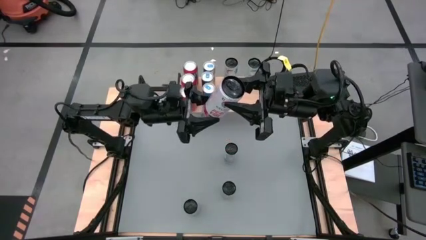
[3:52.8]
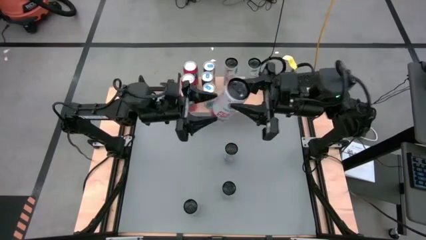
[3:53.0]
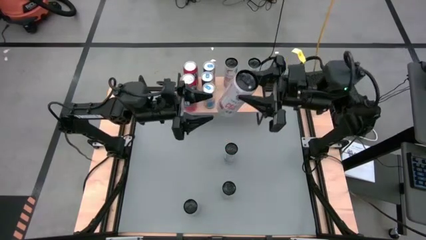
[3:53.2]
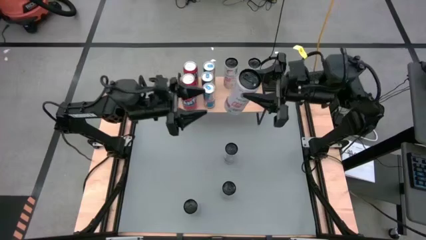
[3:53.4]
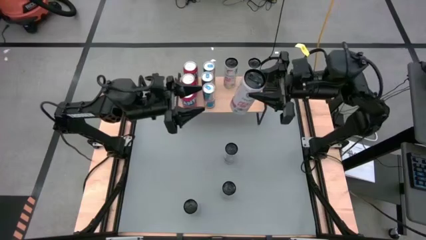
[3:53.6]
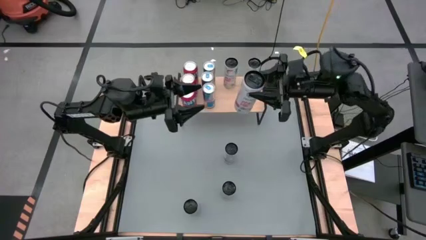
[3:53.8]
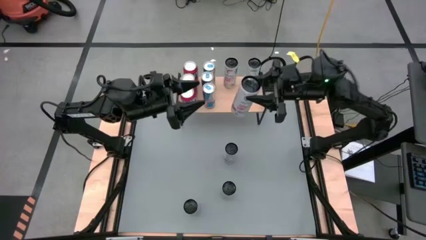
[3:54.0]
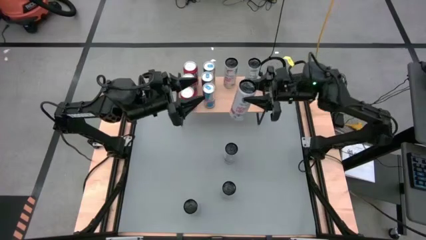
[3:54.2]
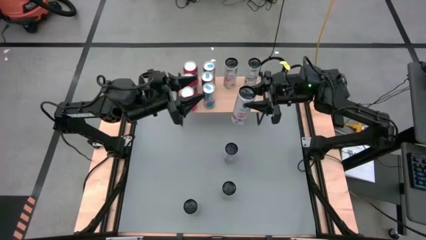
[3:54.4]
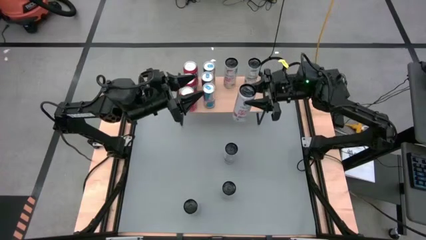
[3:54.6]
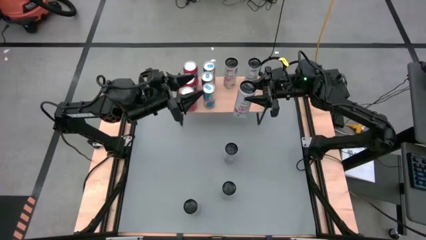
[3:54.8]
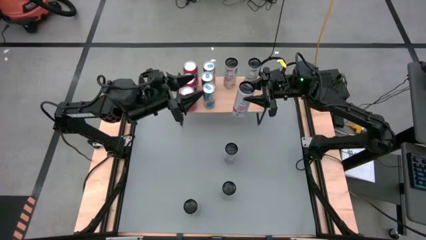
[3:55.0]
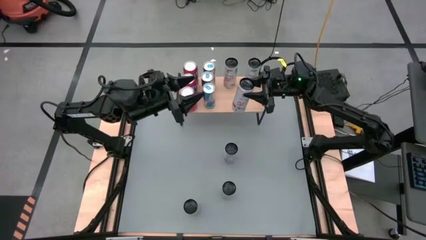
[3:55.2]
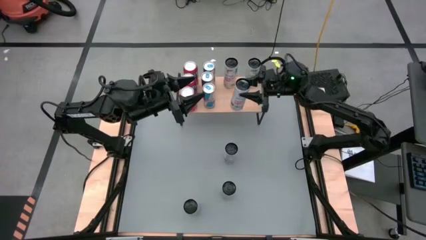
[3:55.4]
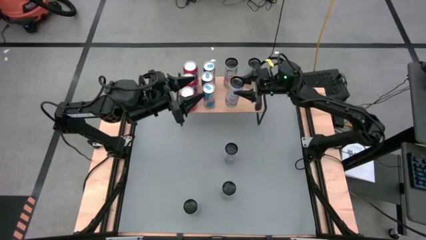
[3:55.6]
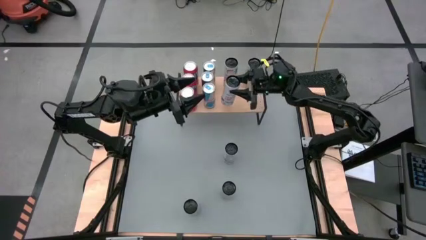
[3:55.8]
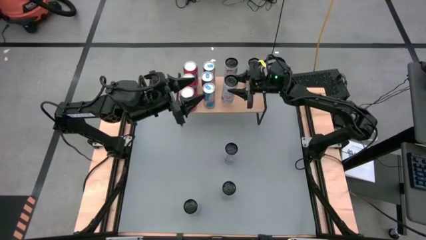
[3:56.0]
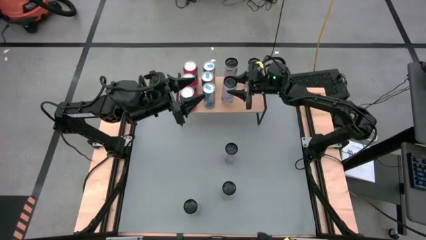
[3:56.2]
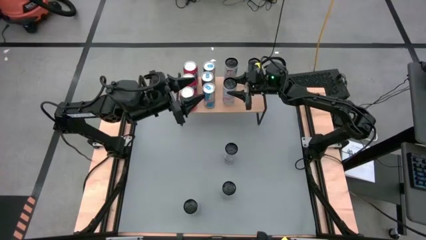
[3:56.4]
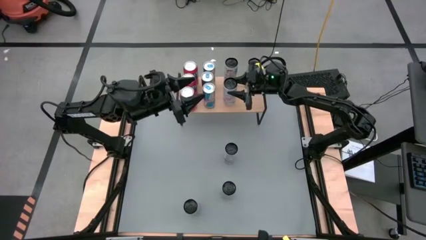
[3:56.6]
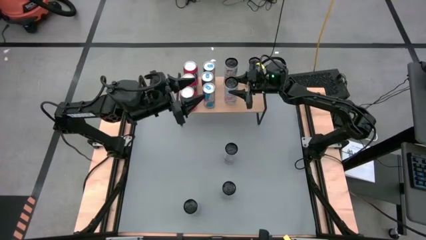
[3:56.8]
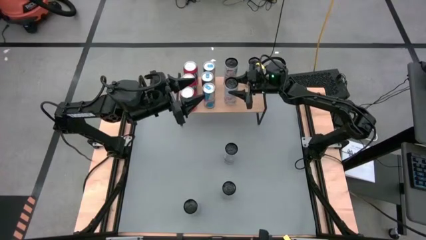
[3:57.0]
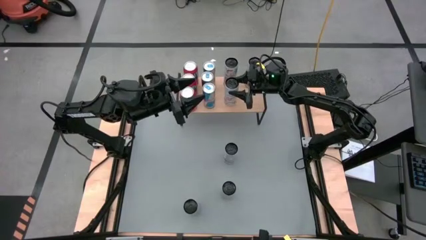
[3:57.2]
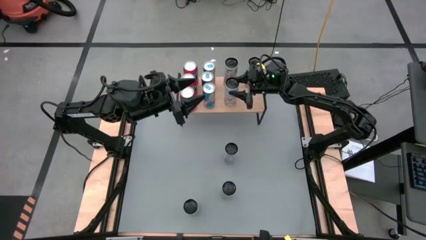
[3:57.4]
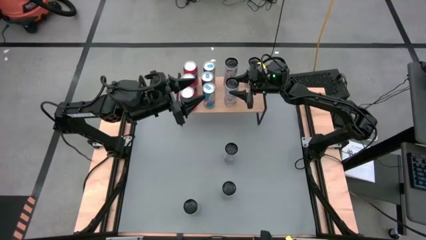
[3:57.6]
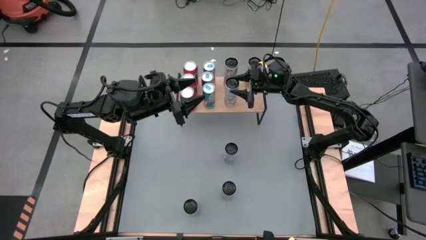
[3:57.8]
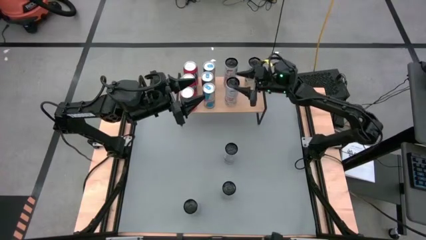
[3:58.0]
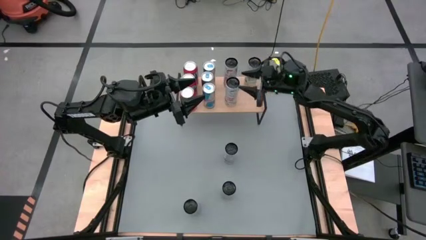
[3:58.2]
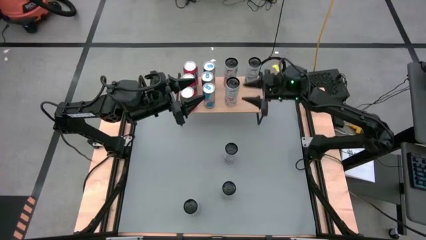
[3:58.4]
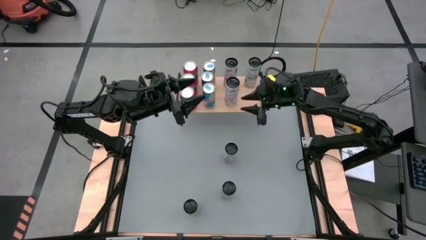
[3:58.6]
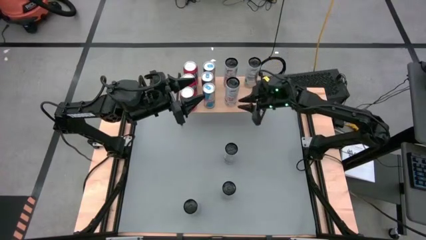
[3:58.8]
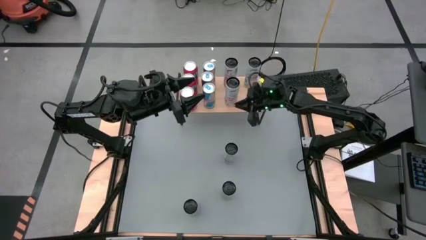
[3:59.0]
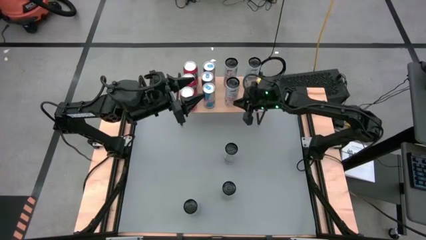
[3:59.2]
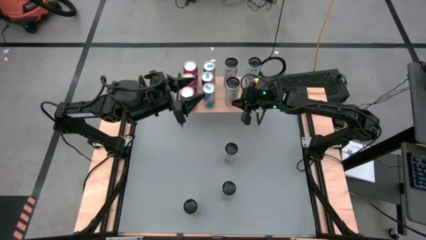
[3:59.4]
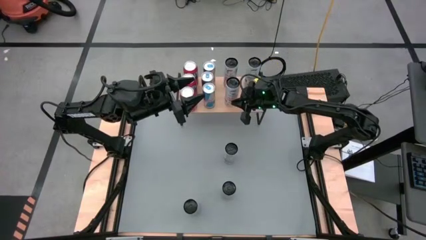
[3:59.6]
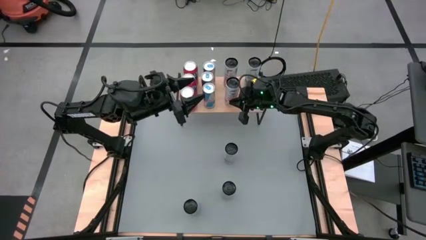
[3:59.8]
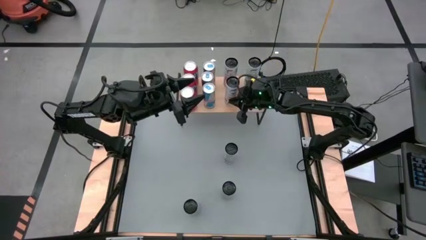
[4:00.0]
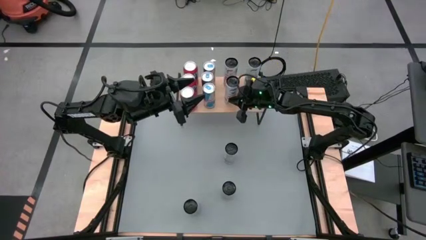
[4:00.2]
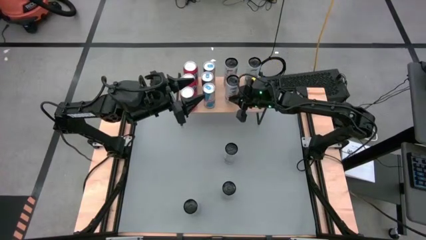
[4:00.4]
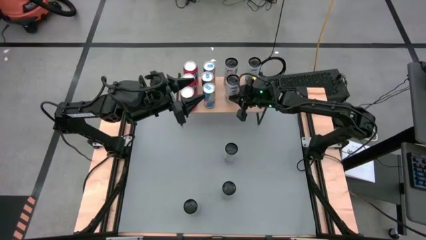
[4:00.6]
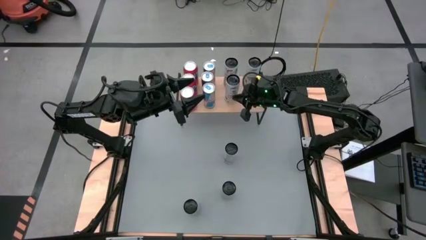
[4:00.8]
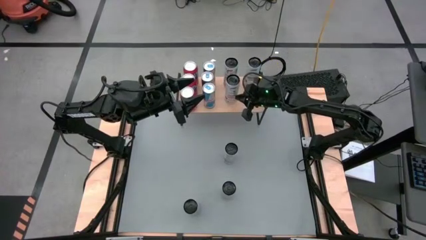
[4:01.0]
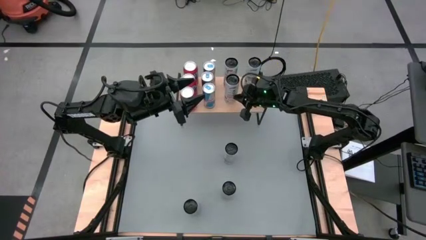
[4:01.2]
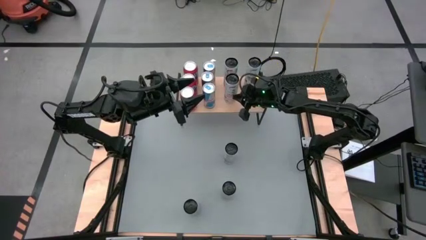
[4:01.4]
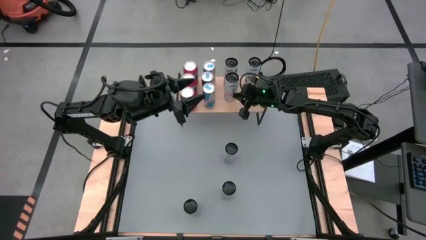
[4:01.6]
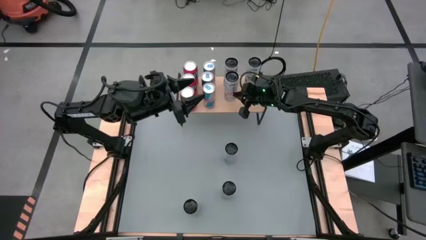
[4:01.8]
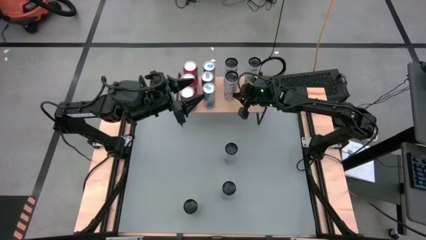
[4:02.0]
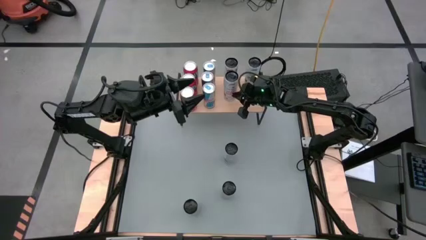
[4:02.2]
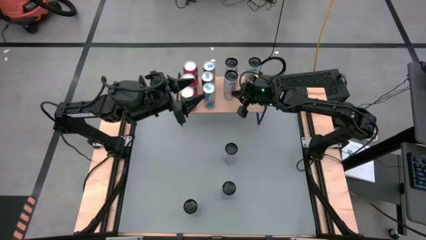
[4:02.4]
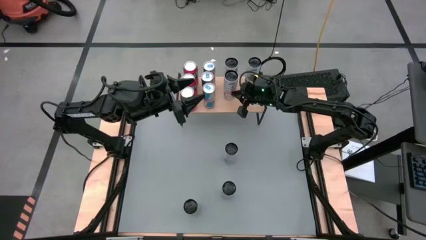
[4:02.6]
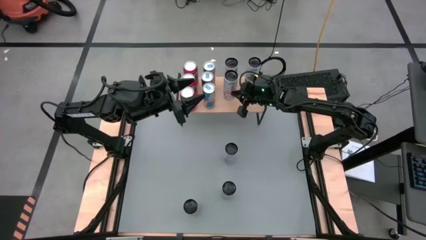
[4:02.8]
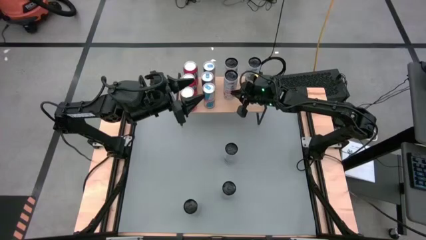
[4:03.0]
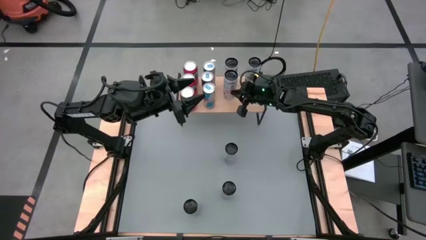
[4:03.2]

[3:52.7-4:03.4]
Task: Place canned beverage on shelf
Put the right white-pink soda can on the shelf aligned with the other white-pink soda can

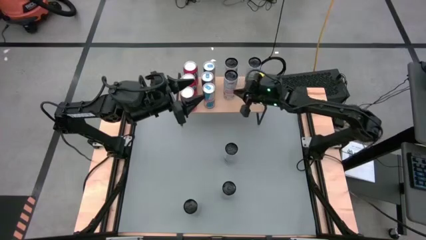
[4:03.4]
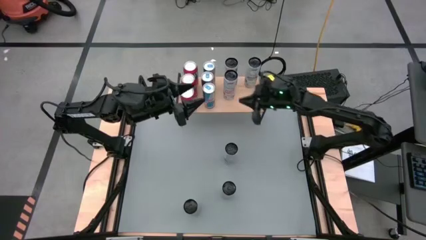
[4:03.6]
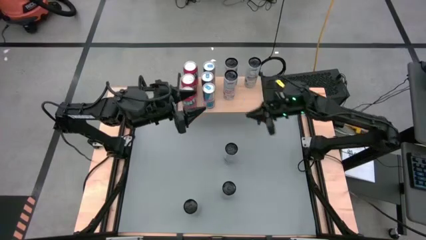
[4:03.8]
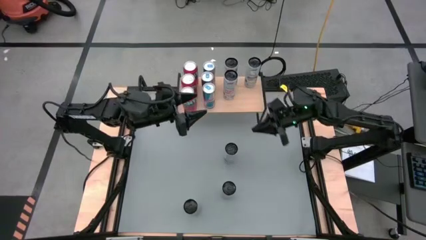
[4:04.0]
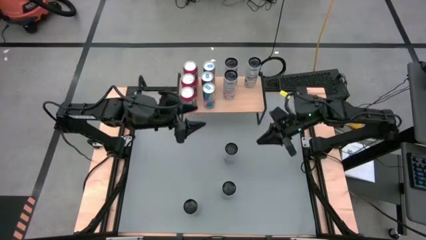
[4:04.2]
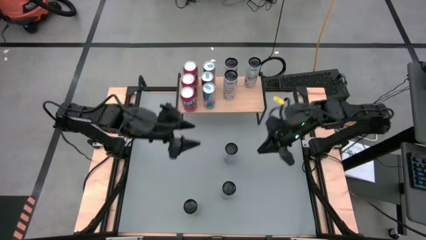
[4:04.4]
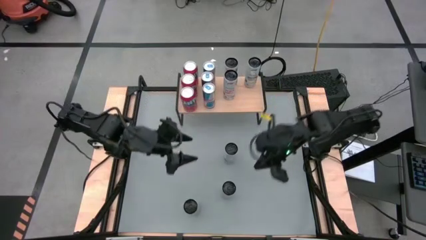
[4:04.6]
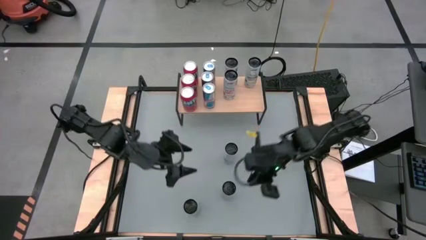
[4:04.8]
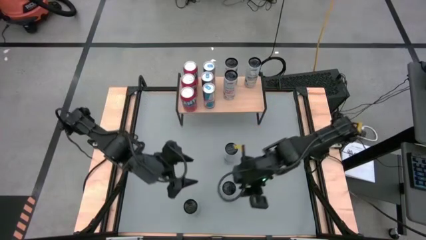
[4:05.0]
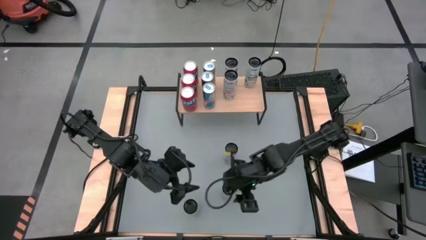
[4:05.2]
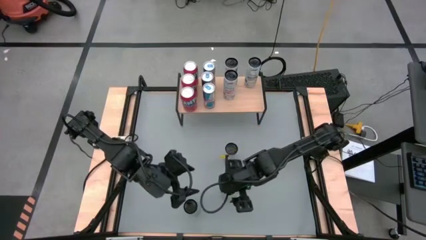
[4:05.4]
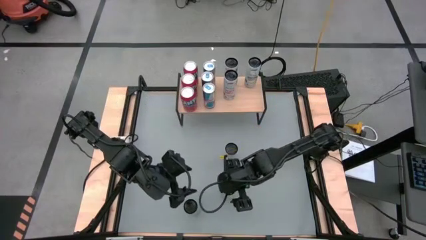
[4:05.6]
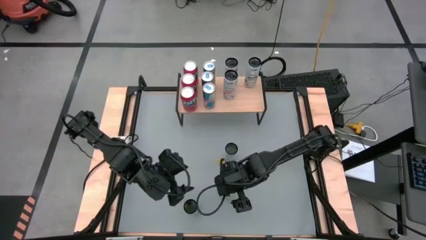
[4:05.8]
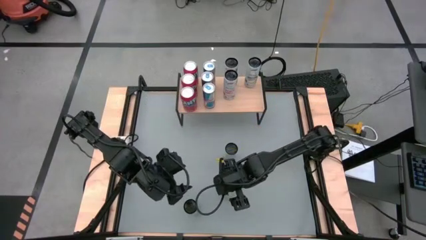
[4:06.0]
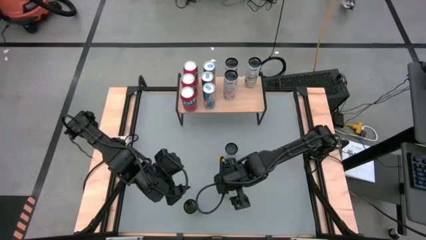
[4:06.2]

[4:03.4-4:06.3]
Put the white-pink soda can on the shelf aligned with the other white-pink soda cans

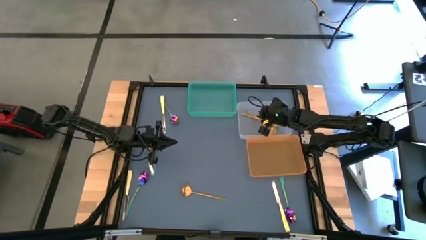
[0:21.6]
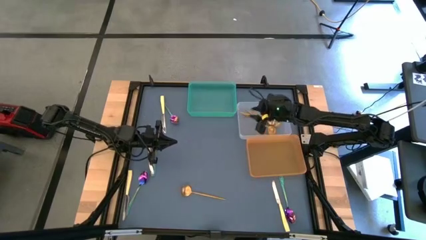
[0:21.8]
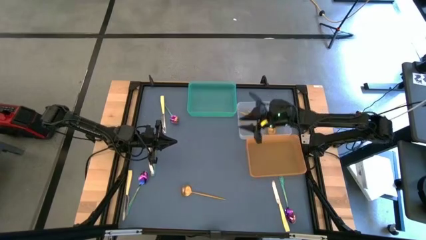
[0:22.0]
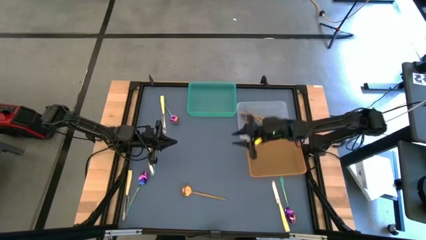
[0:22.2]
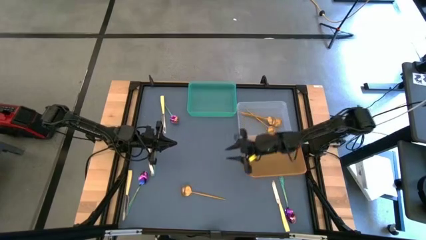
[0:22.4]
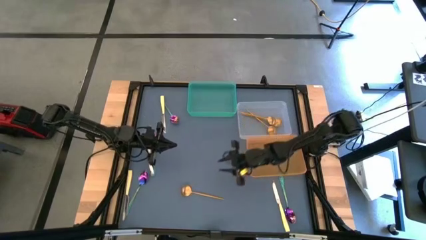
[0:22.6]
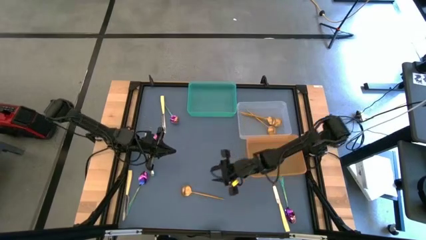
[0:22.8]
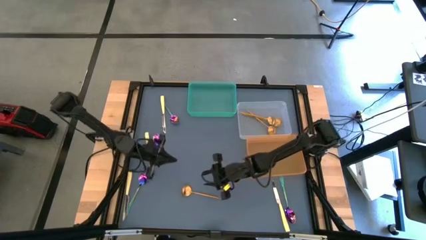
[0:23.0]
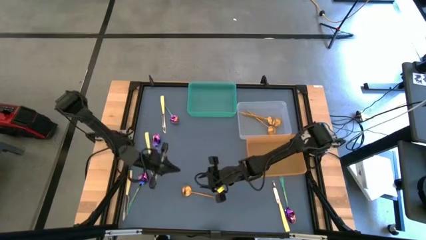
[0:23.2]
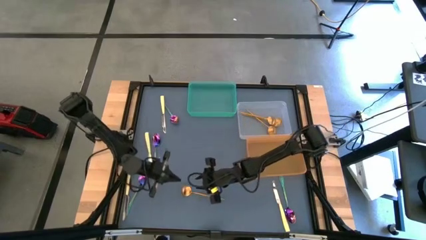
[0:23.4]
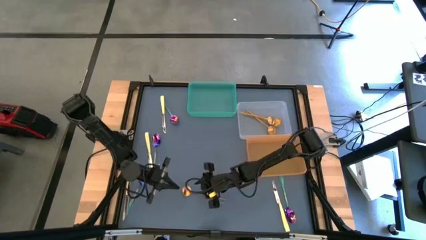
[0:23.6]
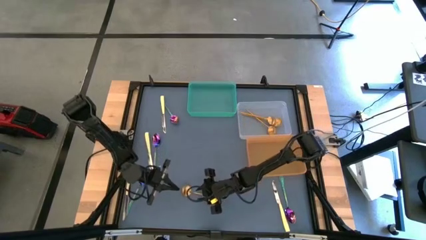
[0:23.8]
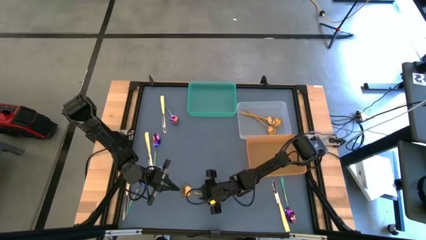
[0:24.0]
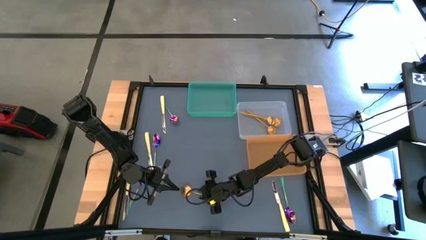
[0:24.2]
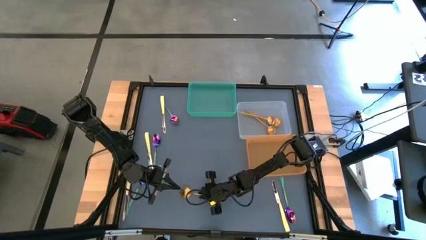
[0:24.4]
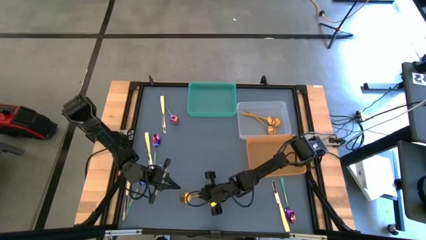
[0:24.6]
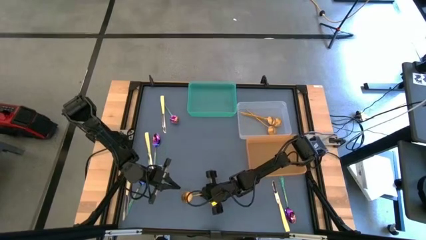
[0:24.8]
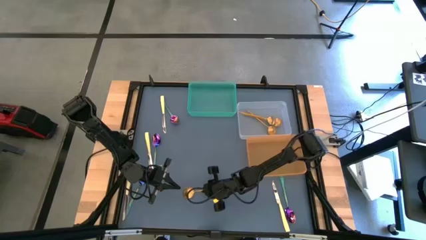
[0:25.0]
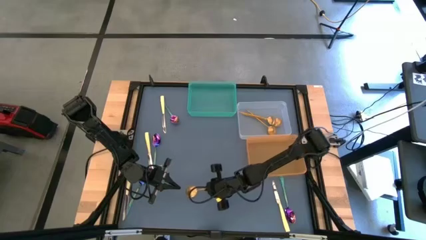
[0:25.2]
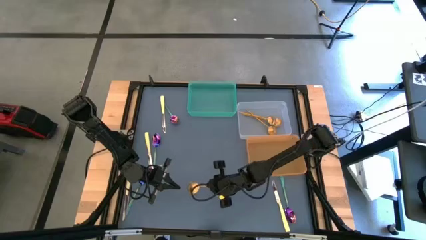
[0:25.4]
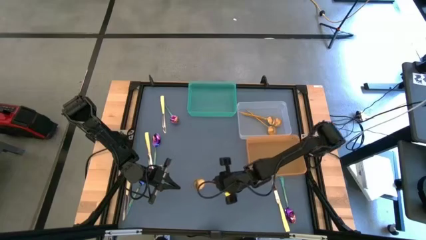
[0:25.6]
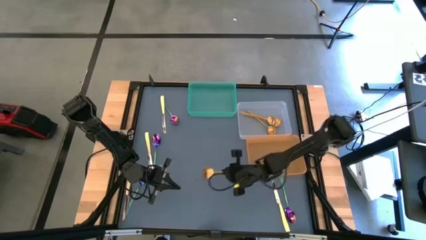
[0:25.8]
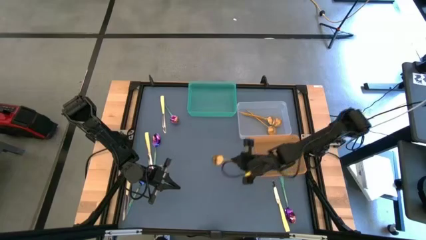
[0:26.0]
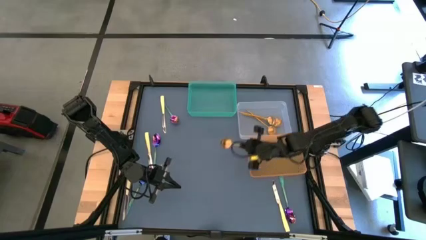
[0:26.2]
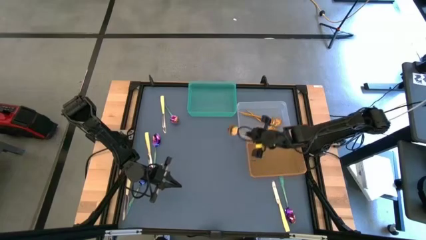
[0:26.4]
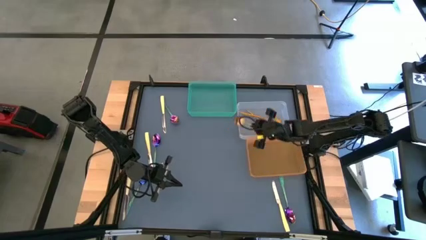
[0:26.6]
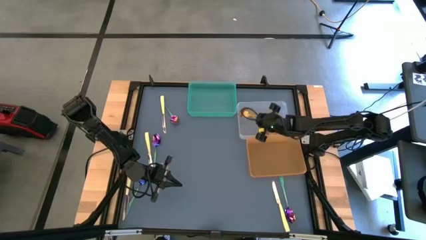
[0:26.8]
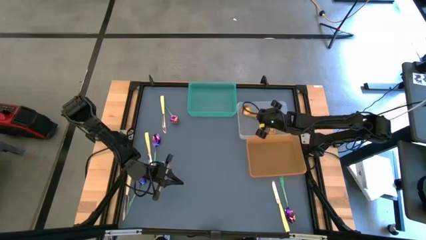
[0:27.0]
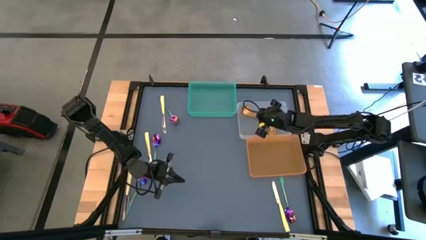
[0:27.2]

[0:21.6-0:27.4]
Task: Sort silverware by color (type)
Put the gold spoon into the transparent bin
